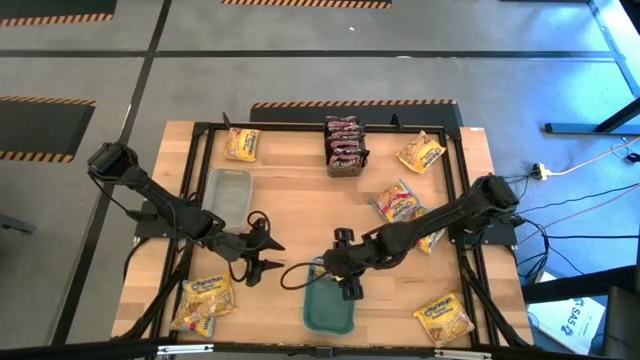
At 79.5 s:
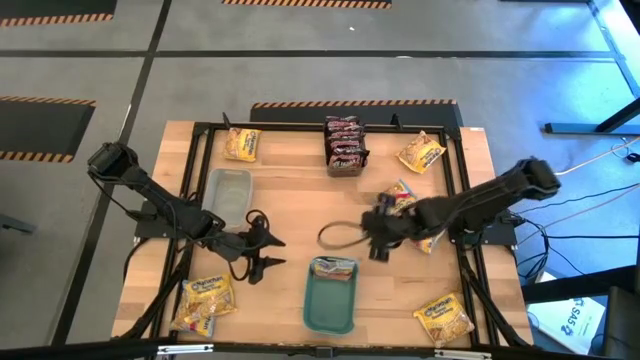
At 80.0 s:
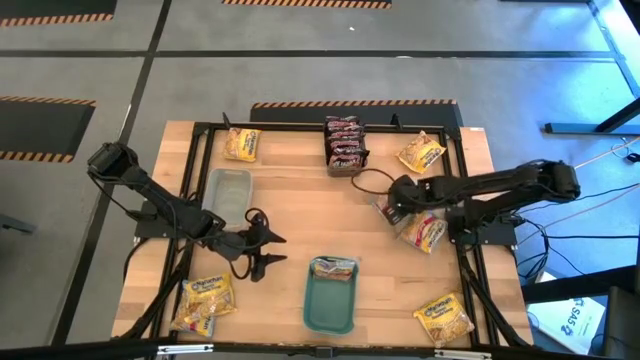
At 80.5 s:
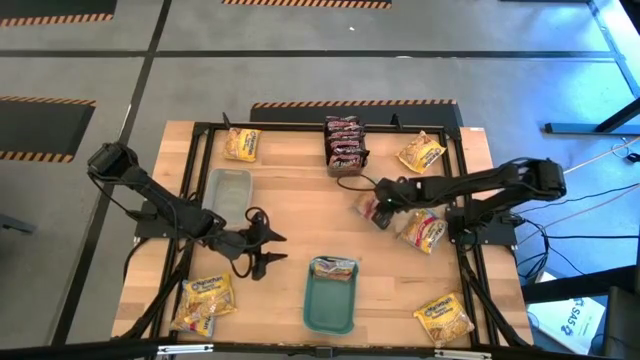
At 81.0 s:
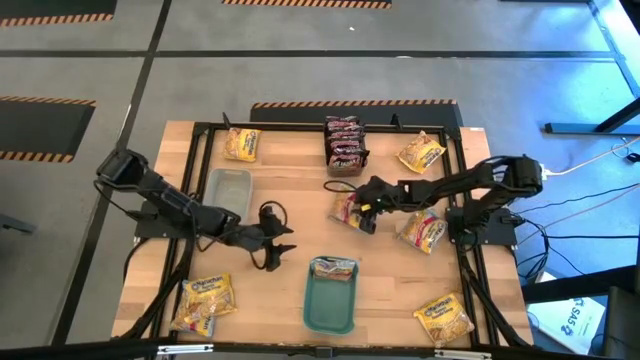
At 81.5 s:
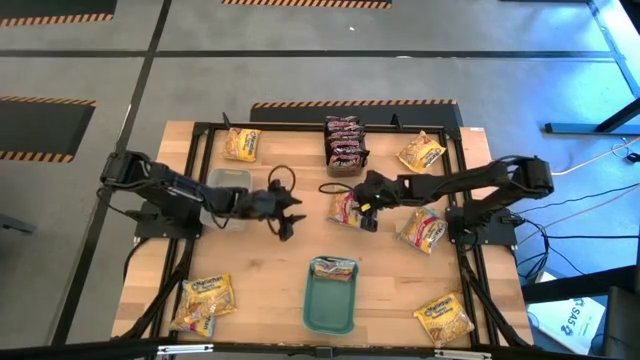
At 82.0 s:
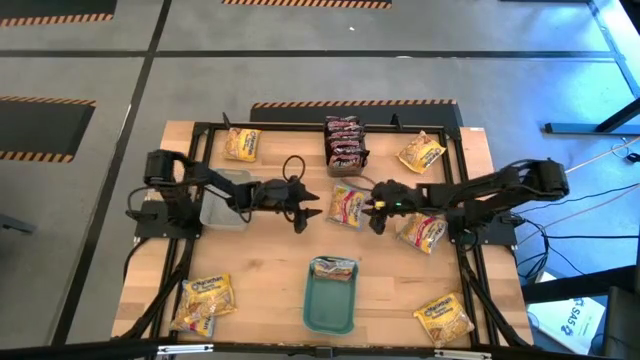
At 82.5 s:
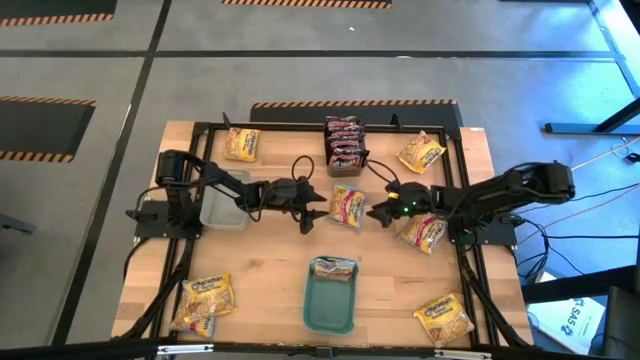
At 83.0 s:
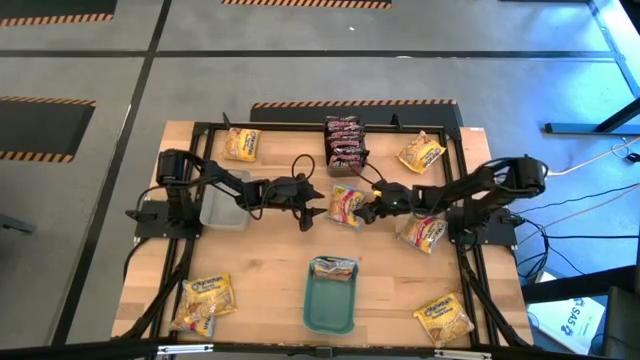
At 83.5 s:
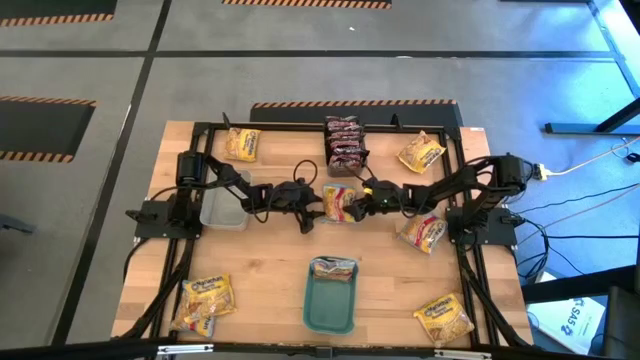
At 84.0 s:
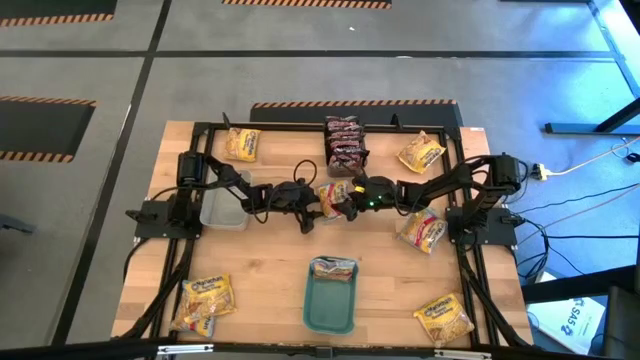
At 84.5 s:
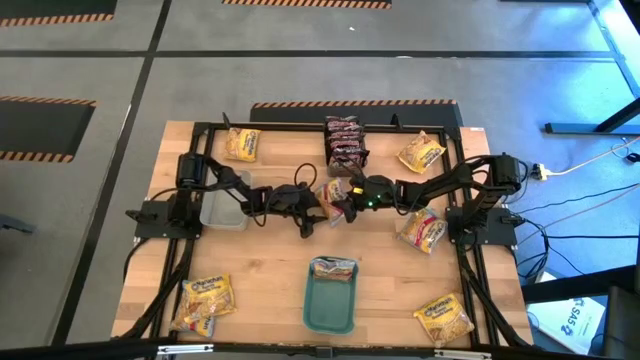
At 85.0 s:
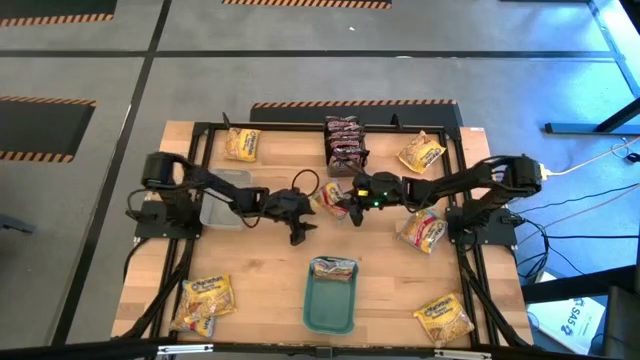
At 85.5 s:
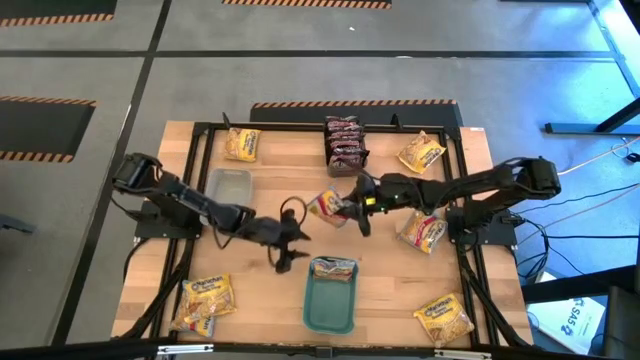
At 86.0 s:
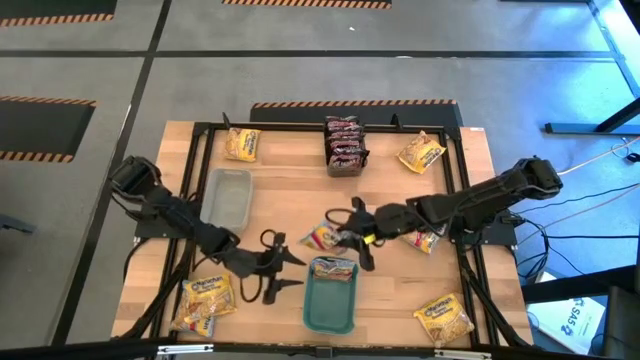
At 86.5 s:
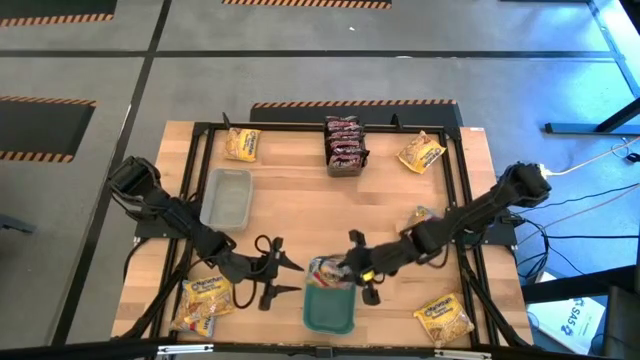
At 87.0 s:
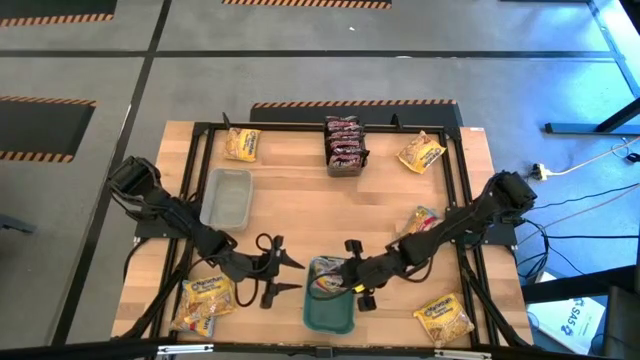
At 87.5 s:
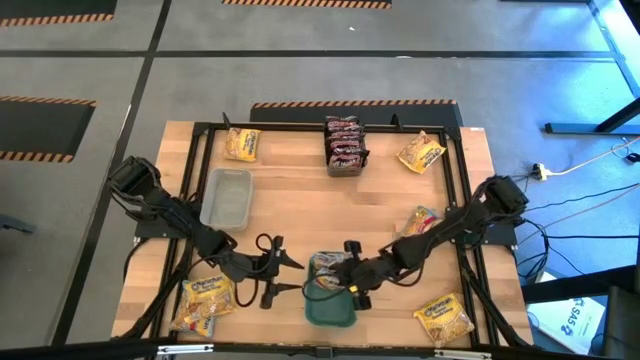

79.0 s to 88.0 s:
Task: Sort Maruchan noodles
Put the blue noodle pack into the blue bin

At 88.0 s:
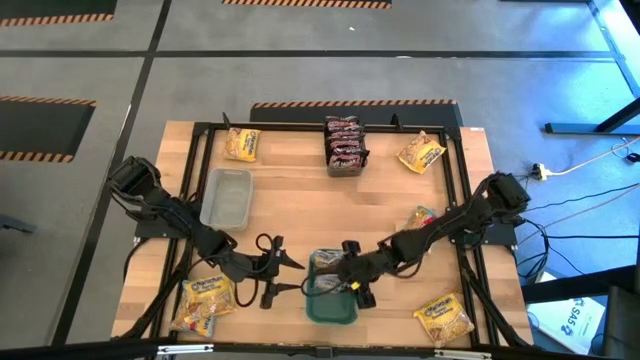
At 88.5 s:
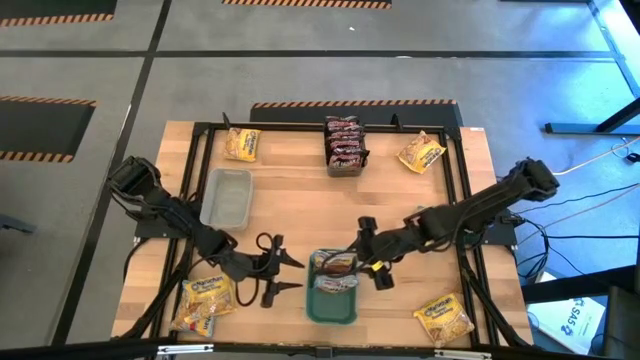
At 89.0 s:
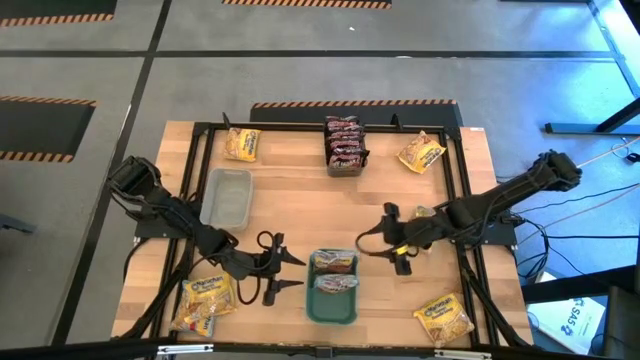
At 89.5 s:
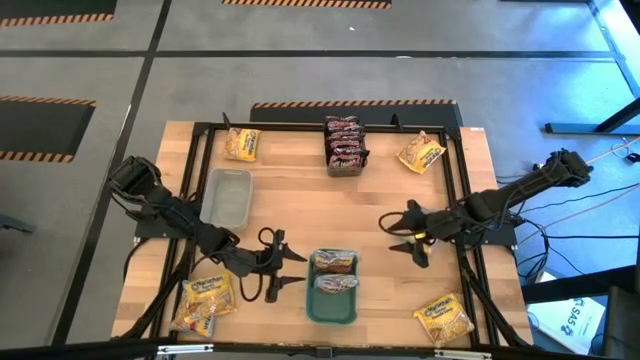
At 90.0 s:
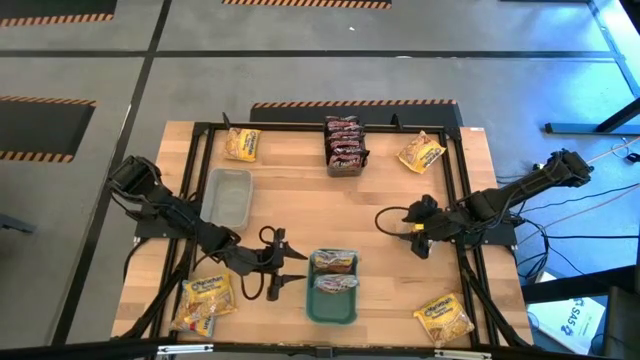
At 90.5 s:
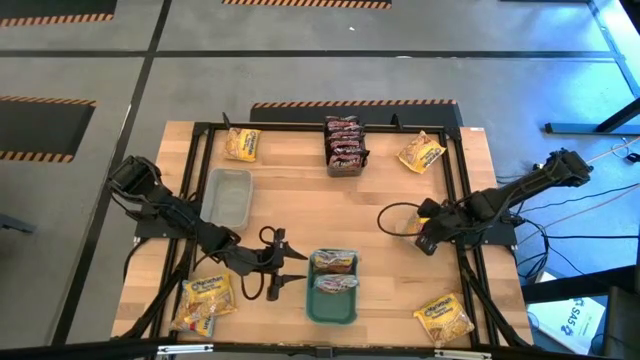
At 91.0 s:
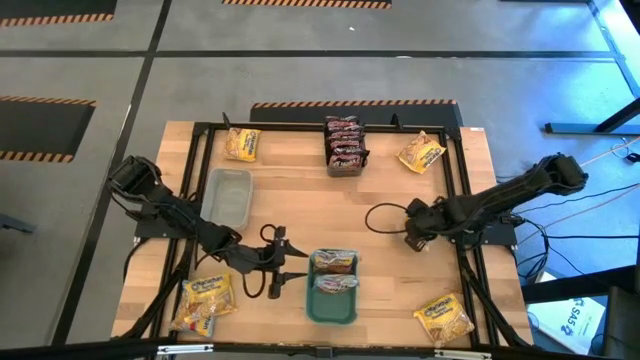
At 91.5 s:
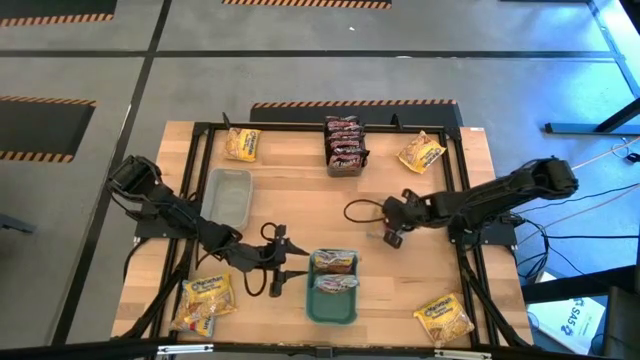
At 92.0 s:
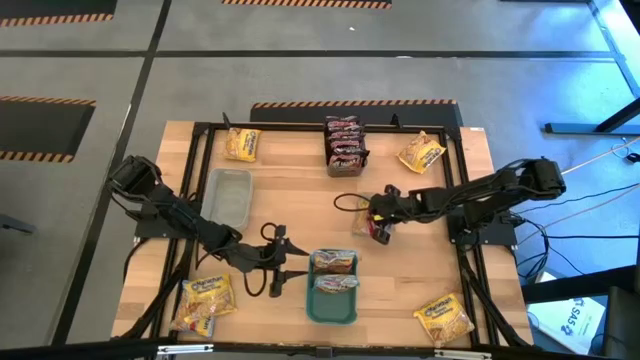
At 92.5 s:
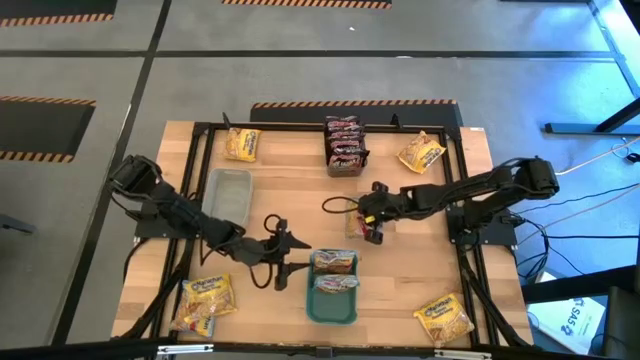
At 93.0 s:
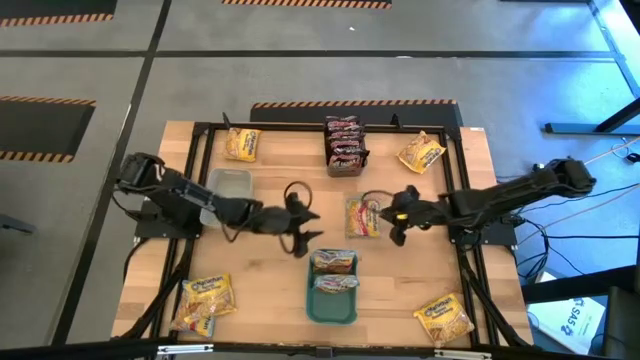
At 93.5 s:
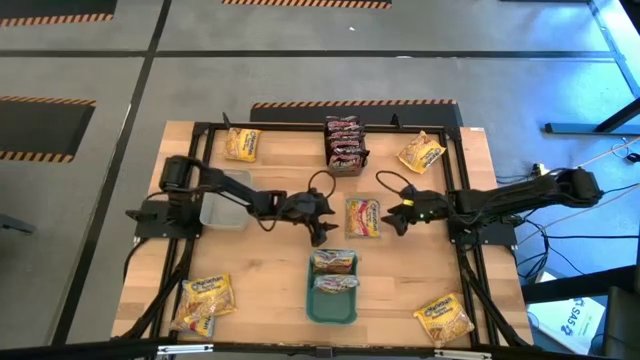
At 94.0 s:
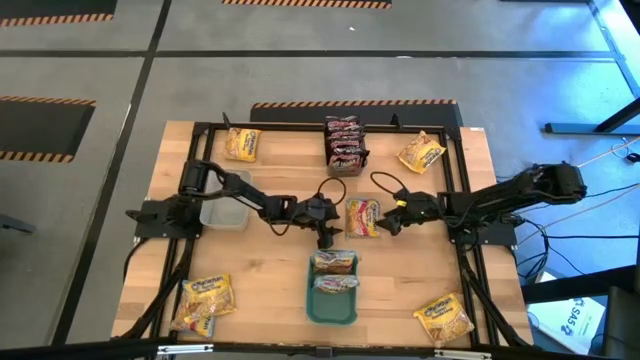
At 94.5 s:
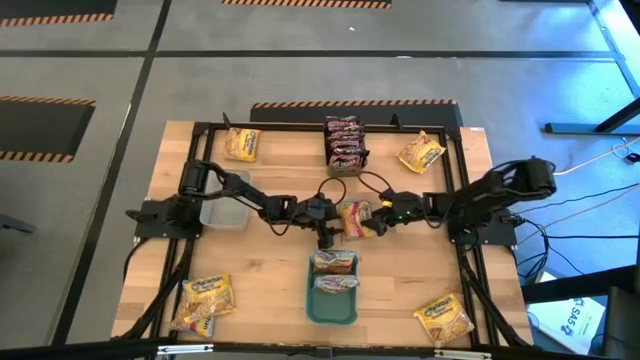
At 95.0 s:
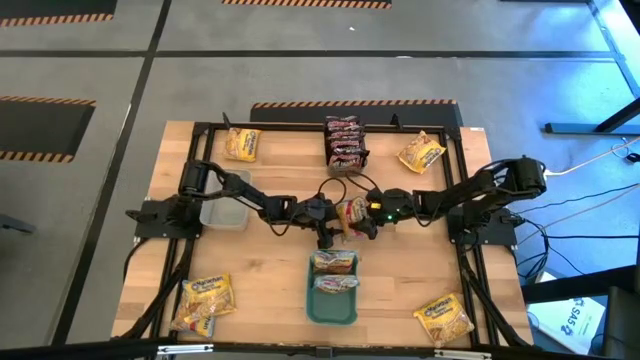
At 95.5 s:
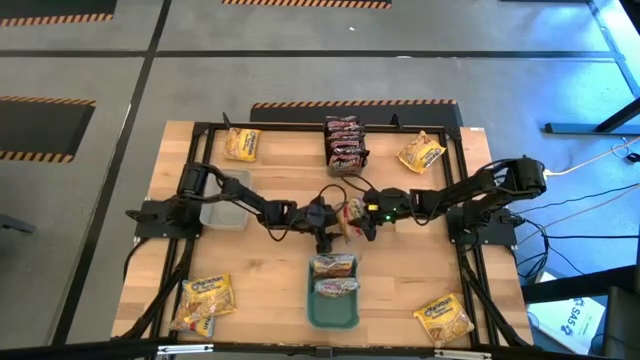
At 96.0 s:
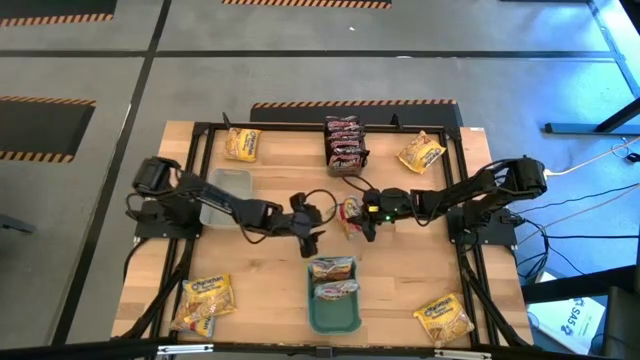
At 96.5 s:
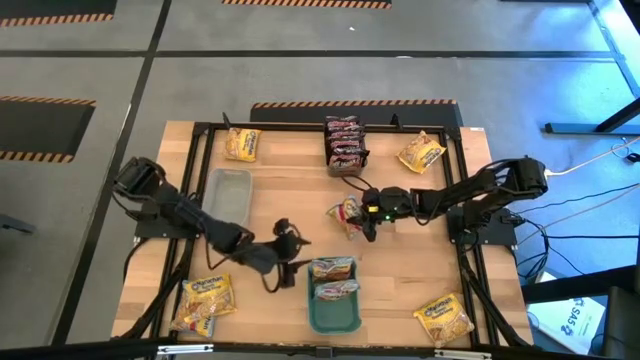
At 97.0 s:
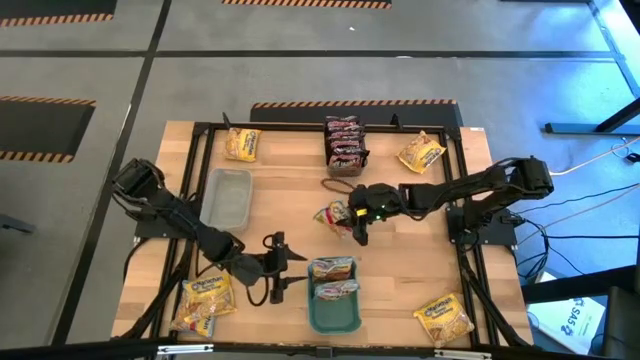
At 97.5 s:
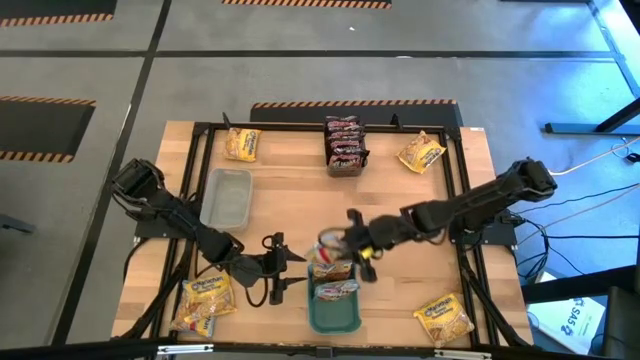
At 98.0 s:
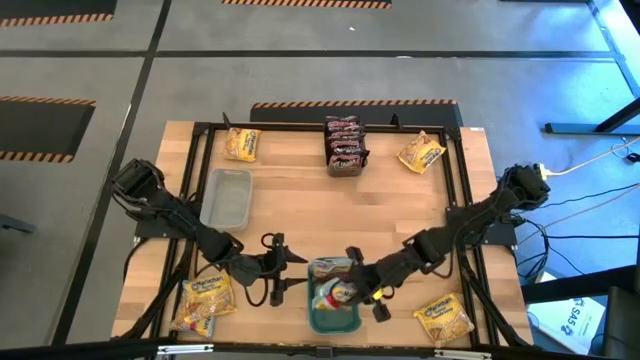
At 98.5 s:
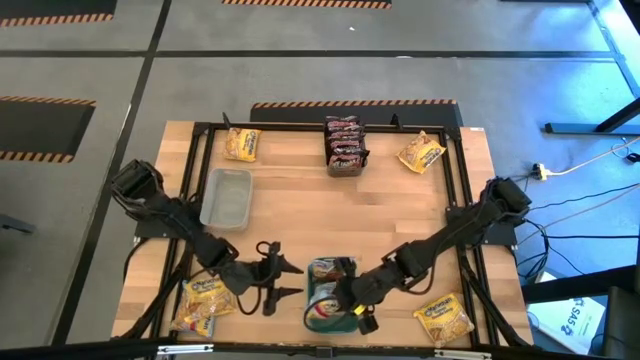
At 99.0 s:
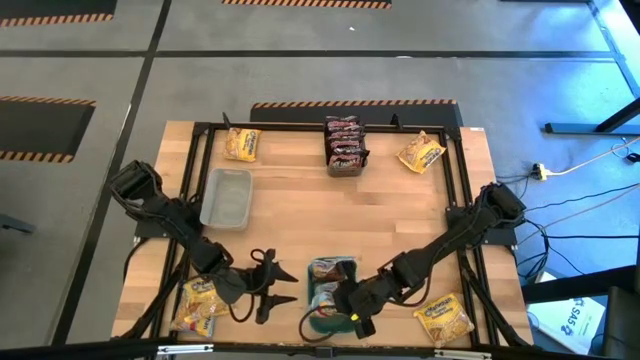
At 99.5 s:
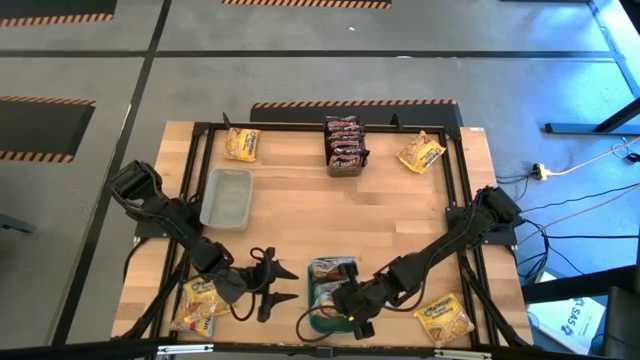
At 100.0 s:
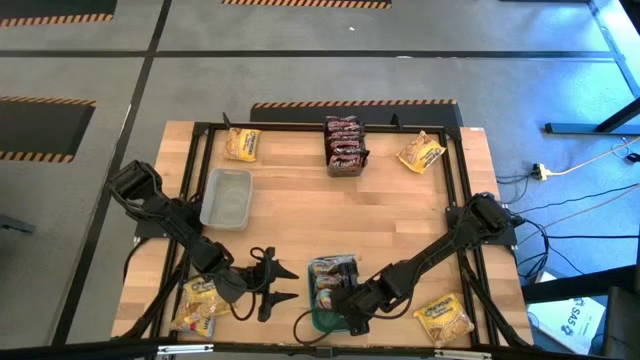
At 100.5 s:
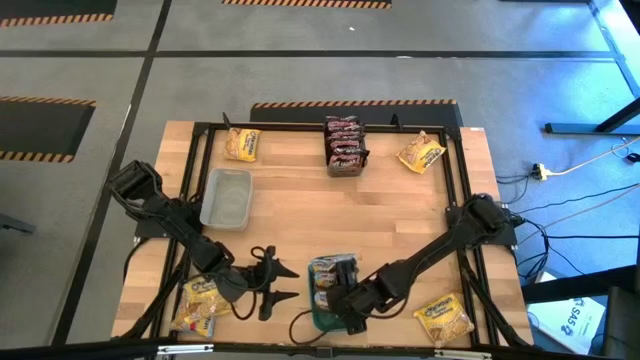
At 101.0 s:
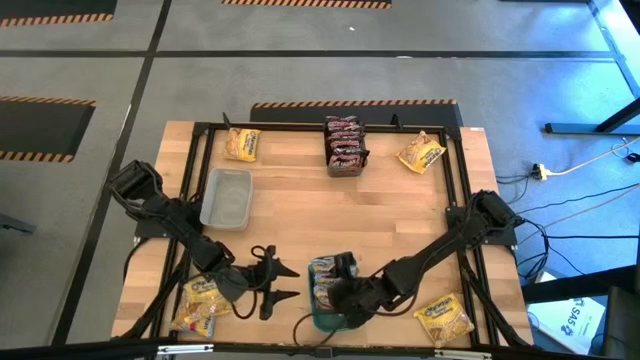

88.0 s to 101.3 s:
Put the blue noodle pack into the blue bin
